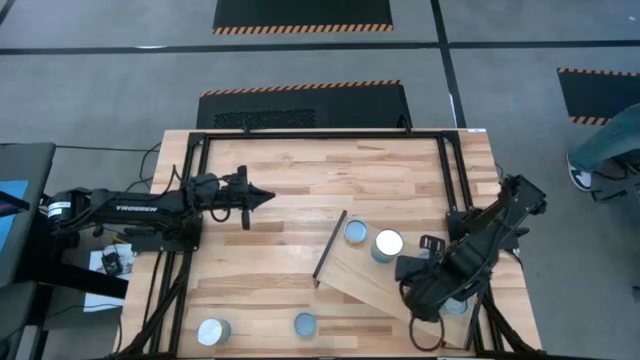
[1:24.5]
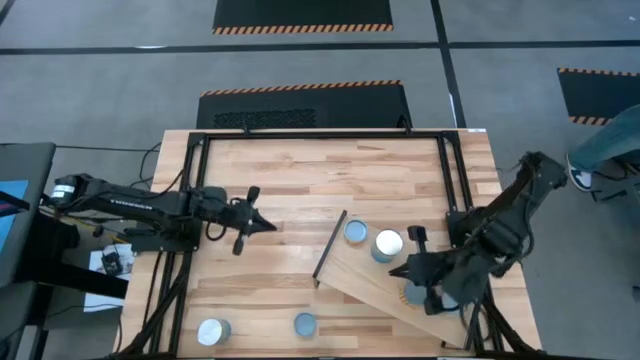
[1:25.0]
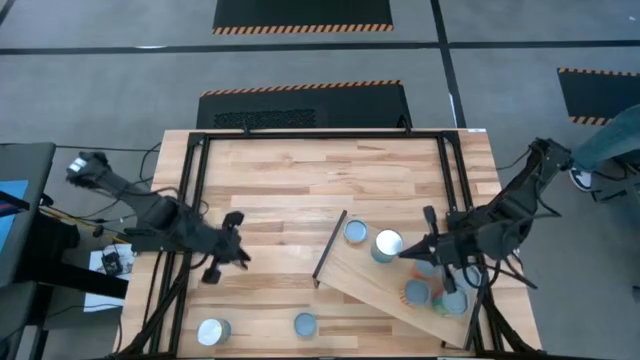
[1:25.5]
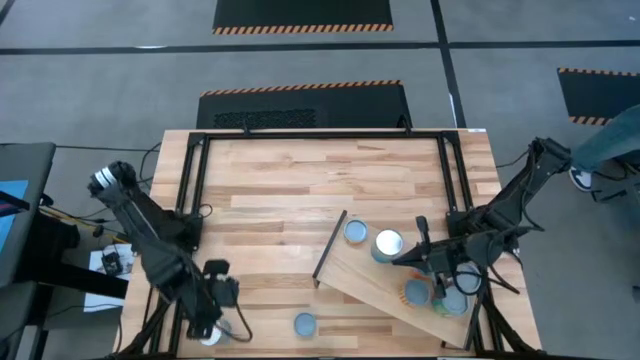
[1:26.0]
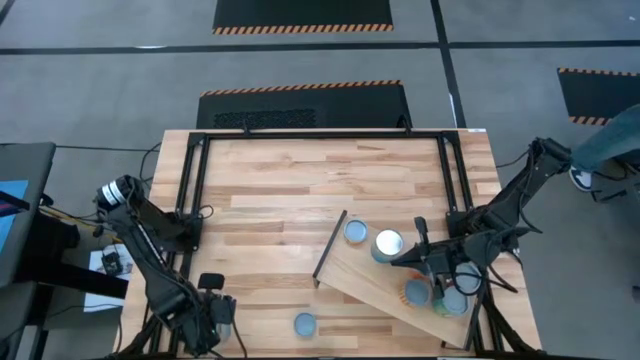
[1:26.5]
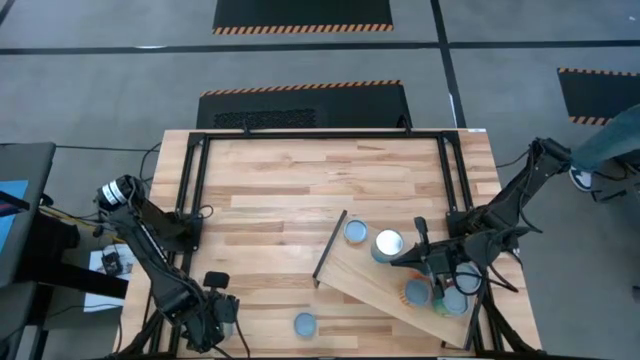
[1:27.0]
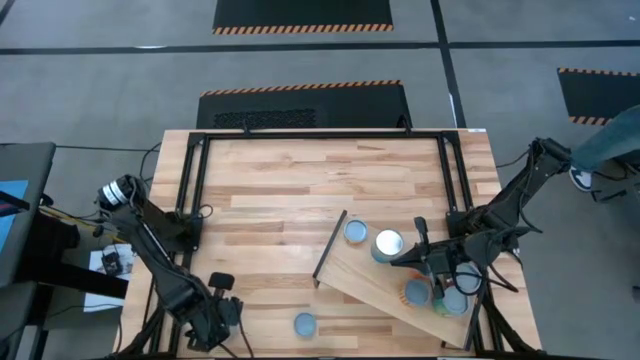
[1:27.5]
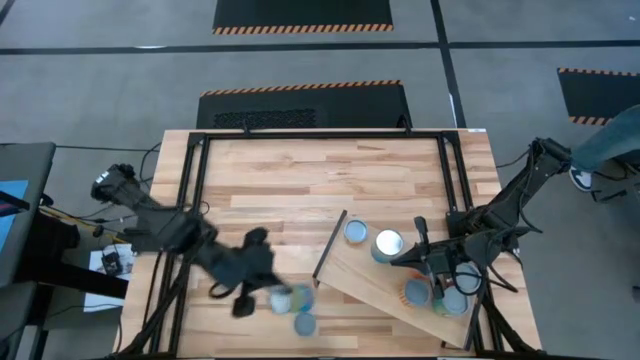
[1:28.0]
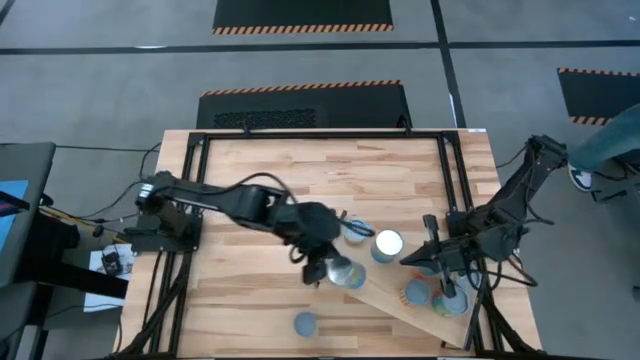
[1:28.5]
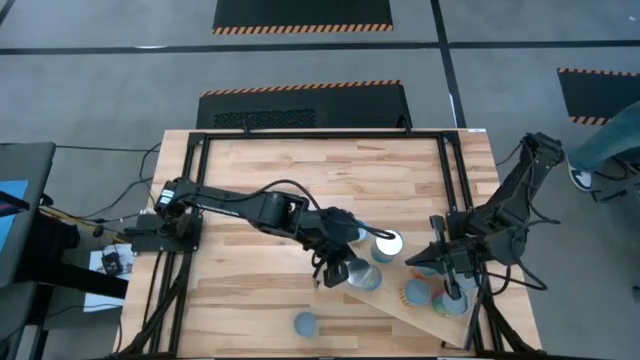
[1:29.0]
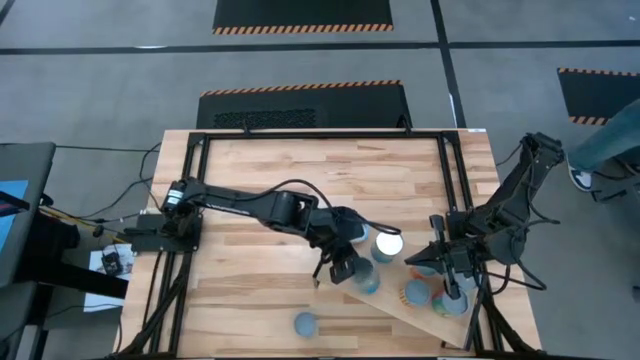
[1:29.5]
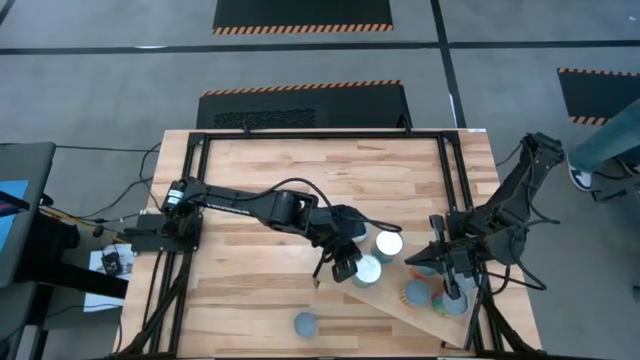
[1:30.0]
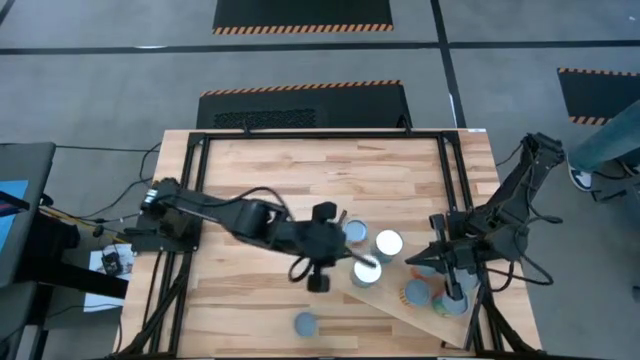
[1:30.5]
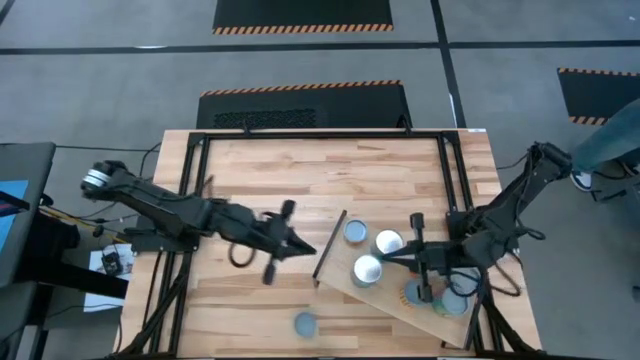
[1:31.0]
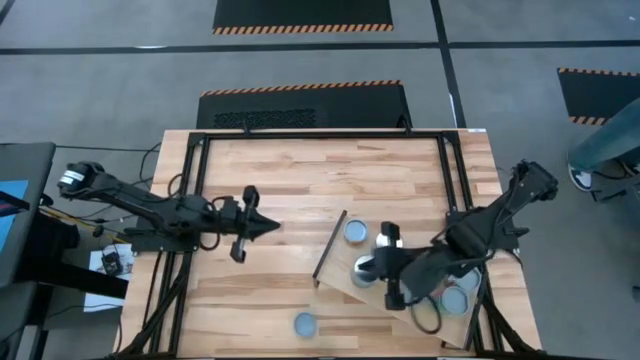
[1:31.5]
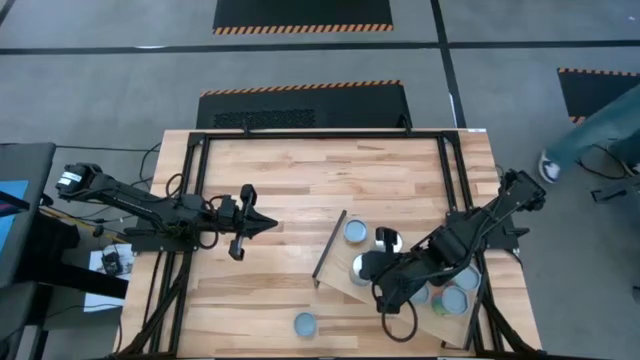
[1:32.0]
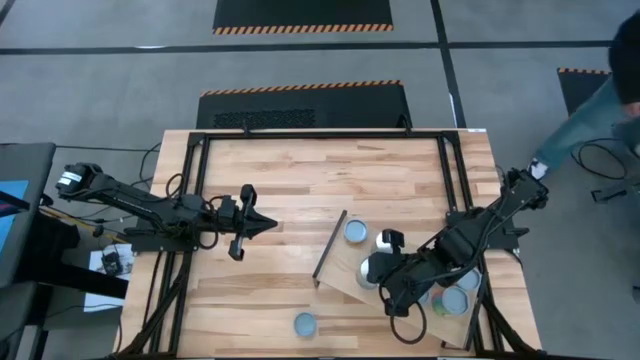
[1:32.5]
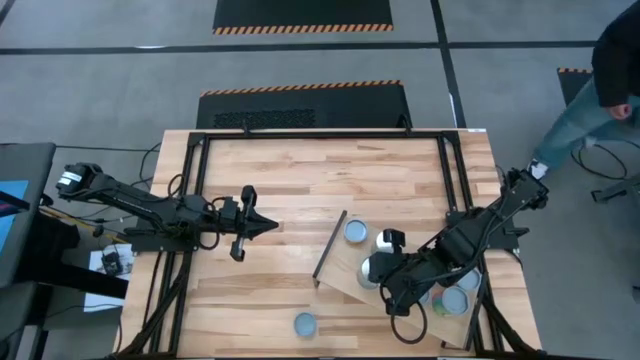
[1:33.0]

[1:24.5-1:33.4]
Task: Pick and place cans onto a shelf
Put the canned cherries on the shelf

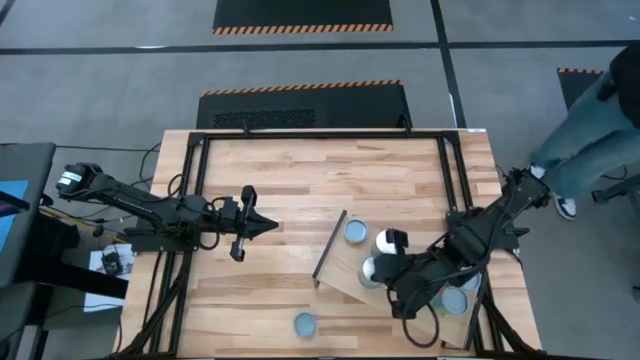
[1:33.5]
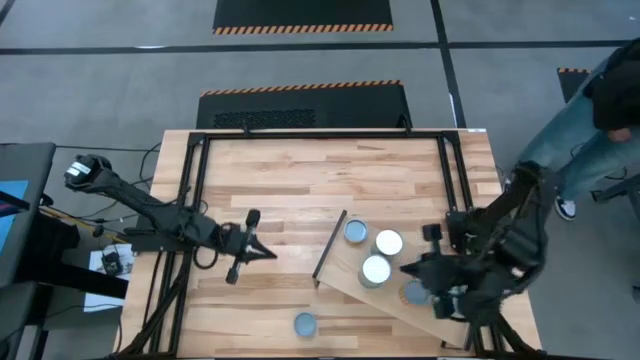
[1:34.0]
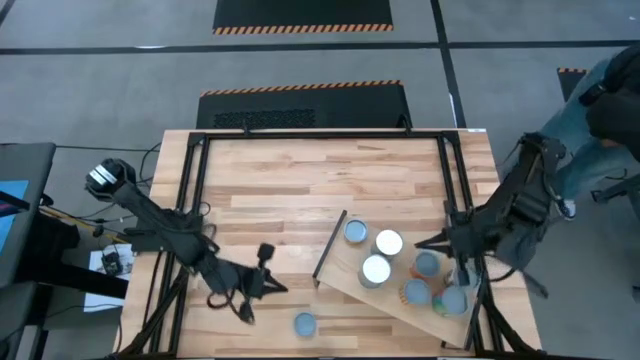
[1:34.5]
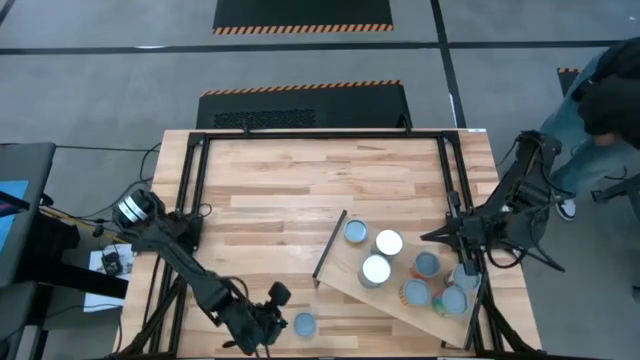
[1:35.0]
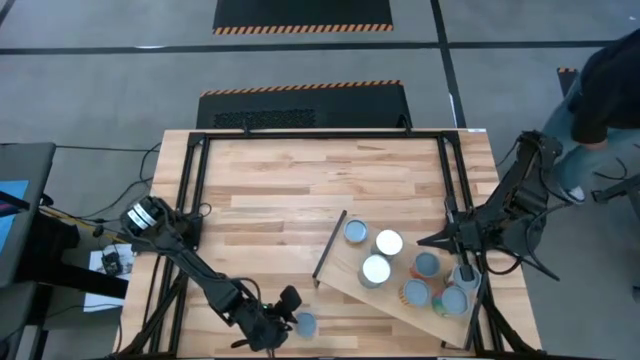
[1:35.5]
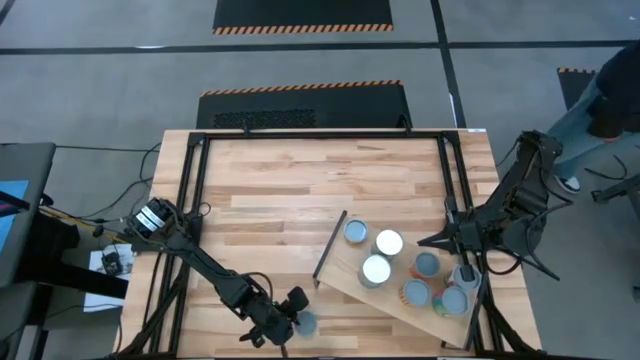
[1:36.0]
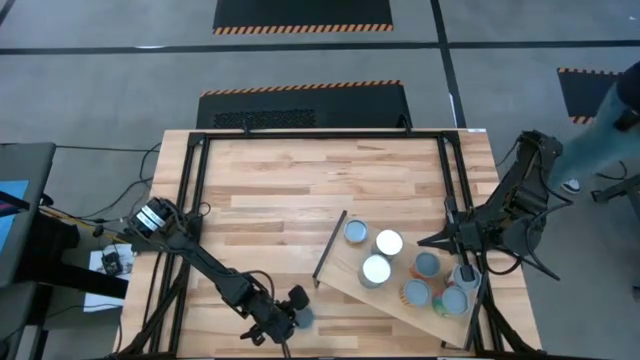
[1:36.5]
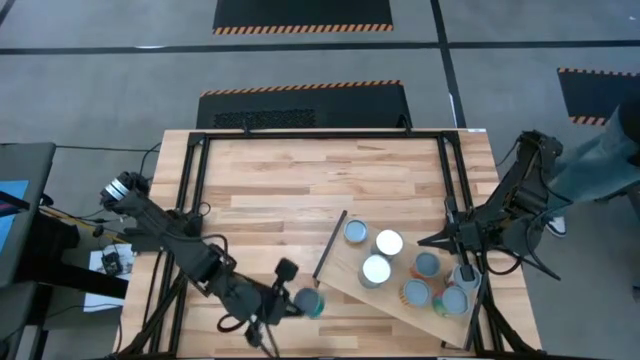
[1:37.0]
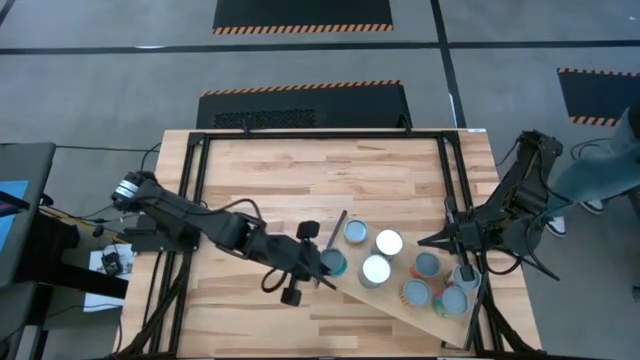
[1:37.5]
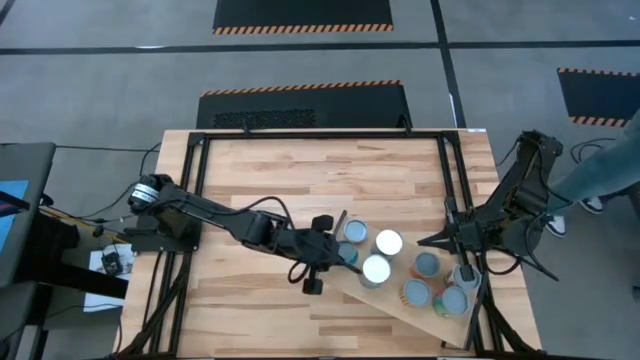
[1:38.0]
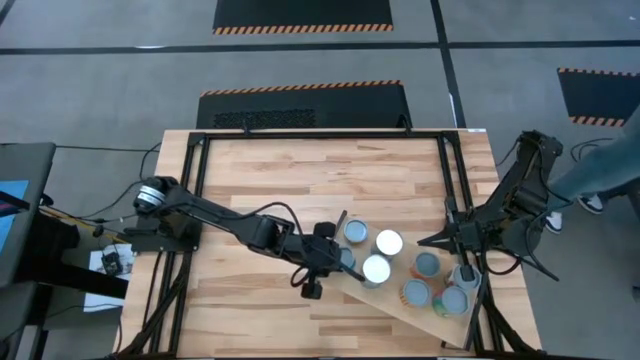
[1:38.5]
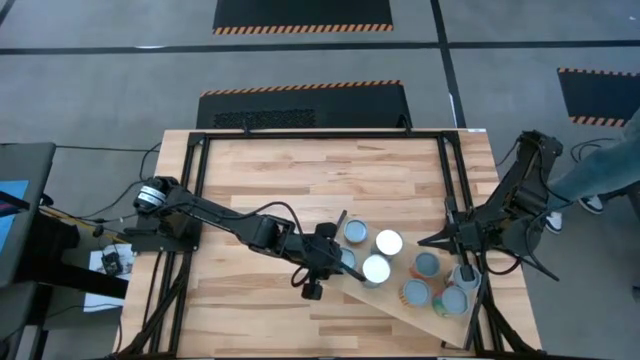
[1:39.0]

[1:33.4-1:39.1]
Put the tuna can on the shelf

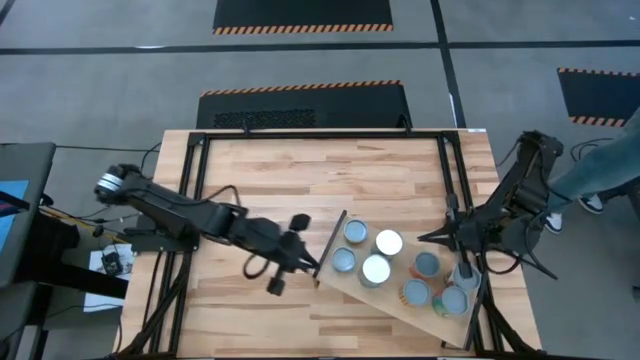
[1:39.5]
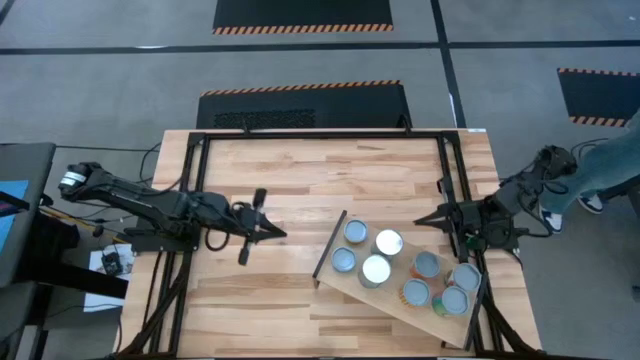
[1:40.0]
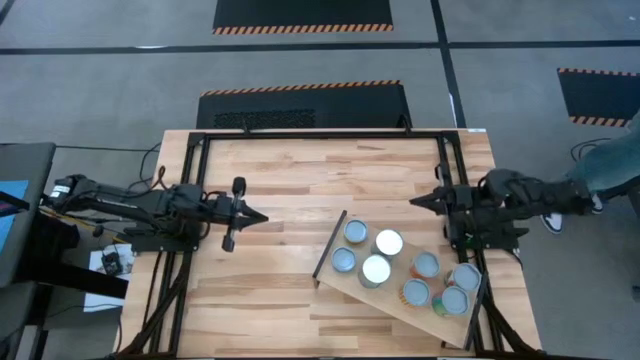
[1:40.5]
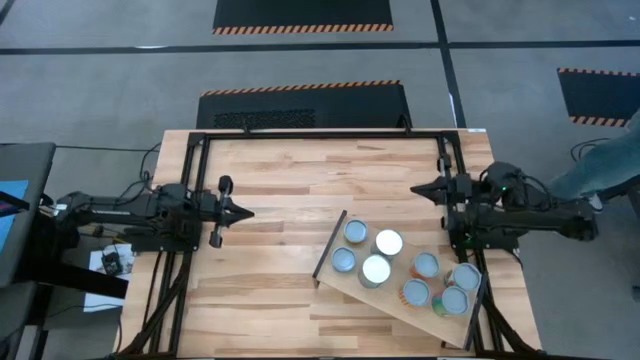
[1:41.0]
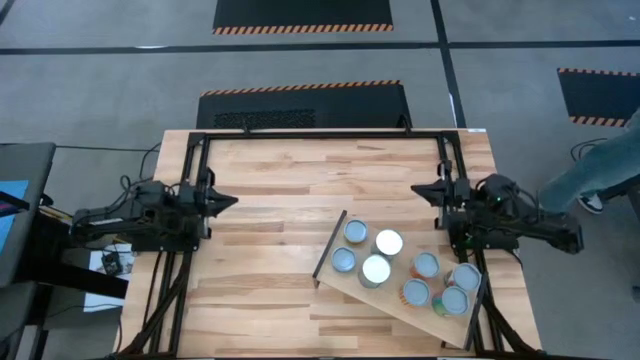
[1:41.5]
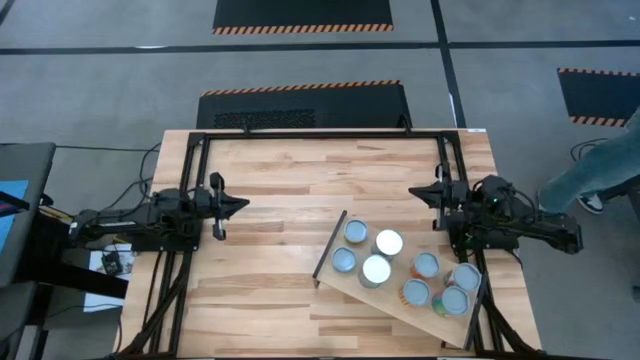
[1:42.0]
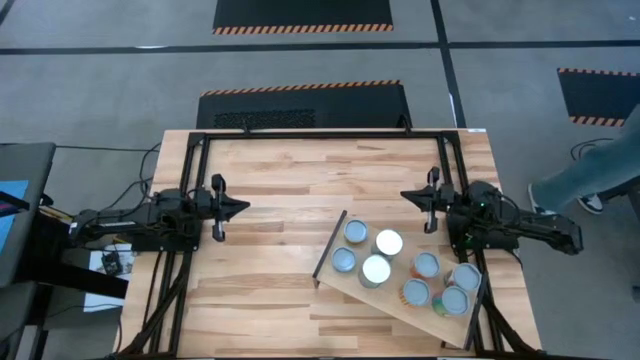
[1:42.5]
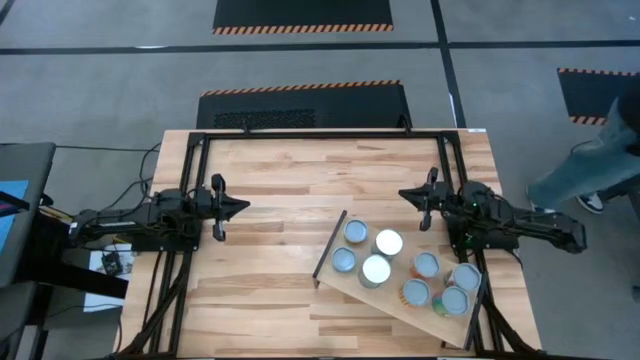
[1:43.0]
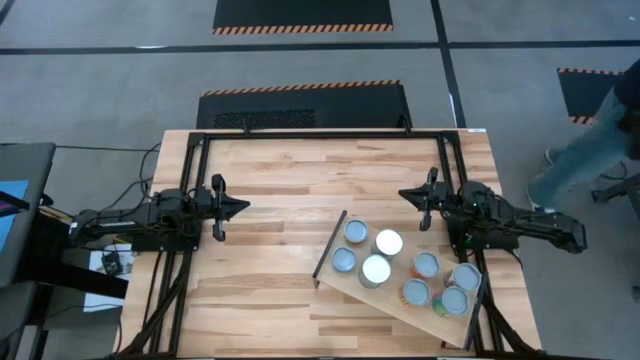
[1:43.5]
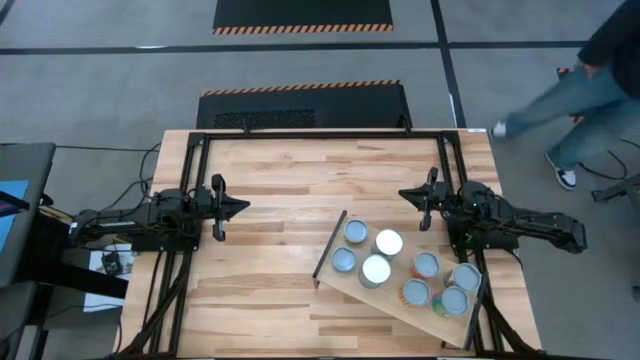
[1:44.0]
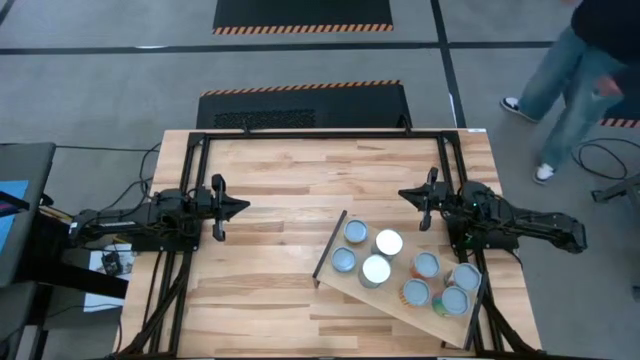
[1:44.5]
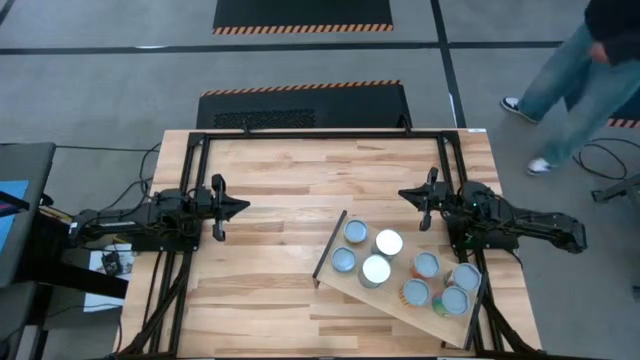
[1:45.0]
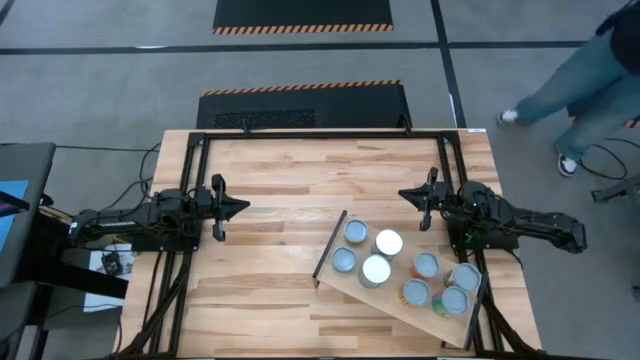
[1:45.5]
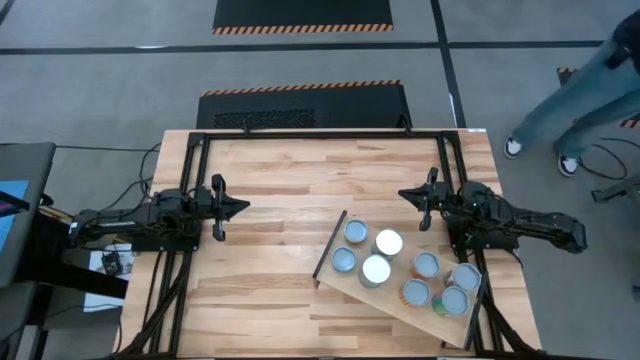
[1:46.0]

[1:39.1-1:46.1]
Return to Home Position
